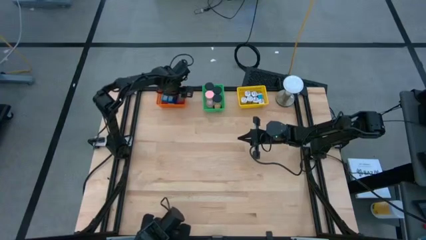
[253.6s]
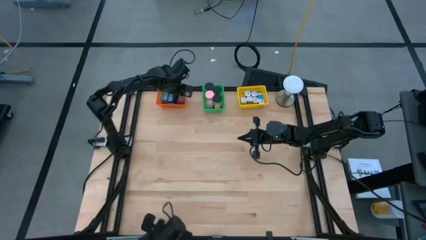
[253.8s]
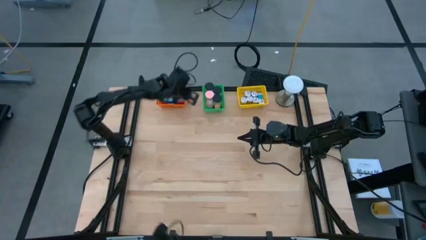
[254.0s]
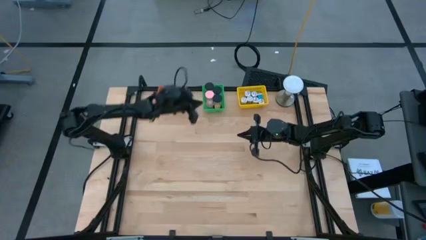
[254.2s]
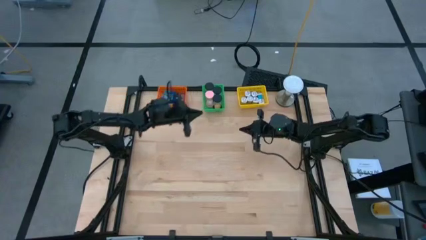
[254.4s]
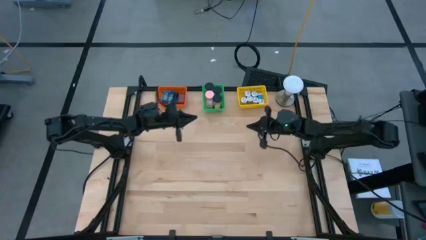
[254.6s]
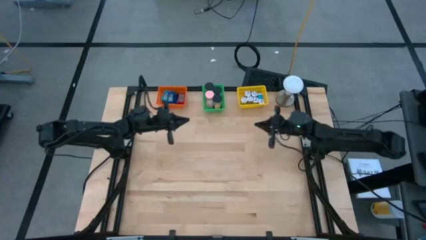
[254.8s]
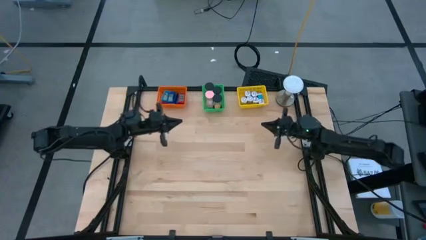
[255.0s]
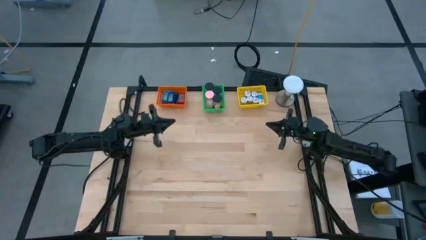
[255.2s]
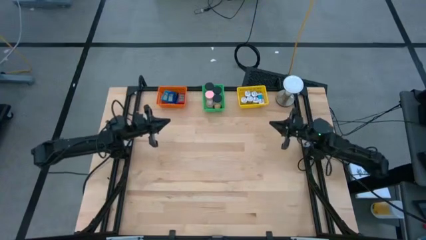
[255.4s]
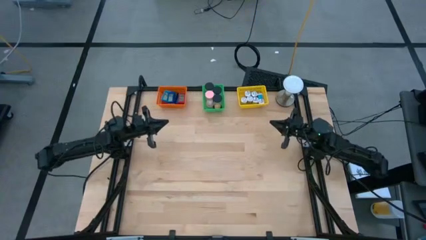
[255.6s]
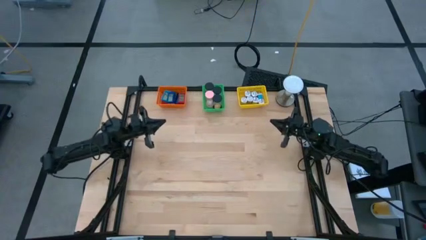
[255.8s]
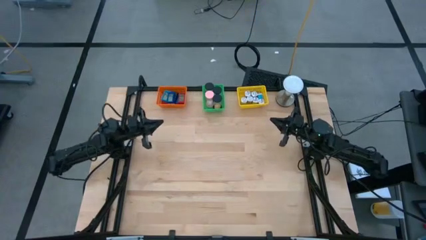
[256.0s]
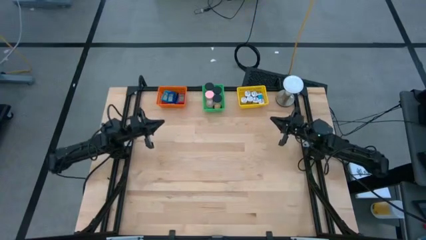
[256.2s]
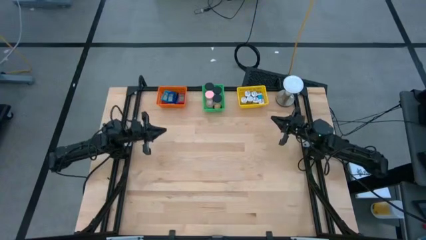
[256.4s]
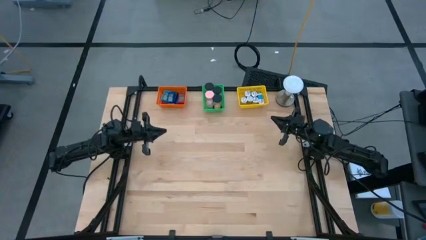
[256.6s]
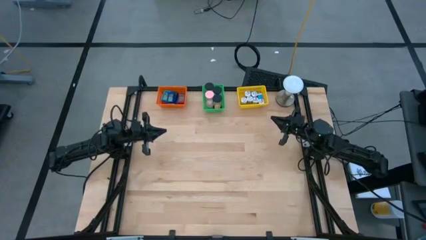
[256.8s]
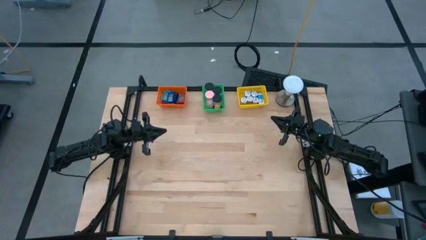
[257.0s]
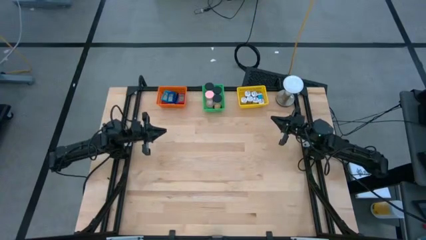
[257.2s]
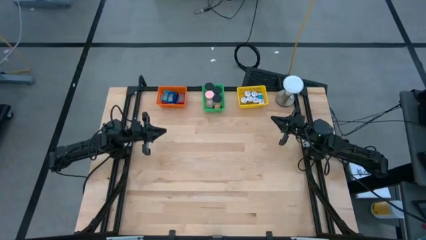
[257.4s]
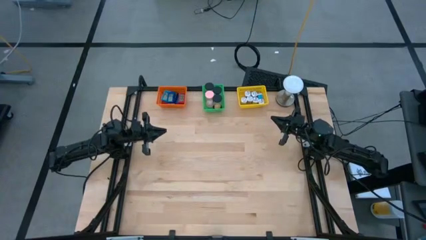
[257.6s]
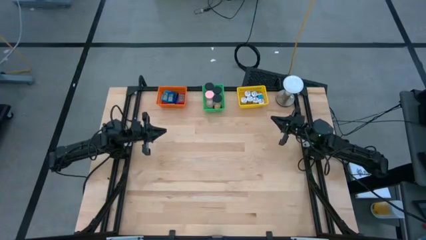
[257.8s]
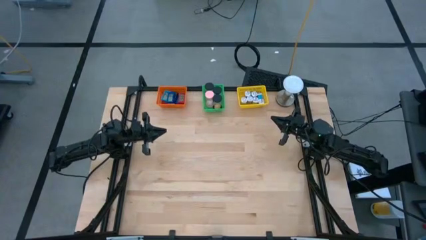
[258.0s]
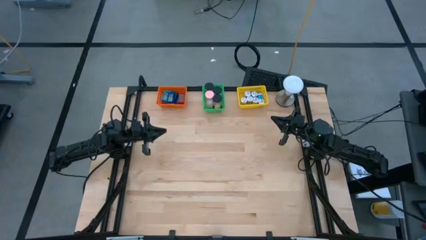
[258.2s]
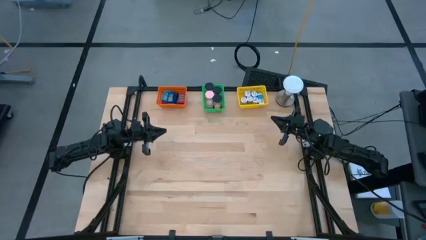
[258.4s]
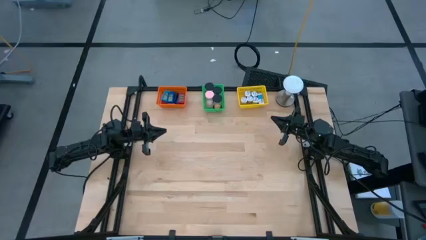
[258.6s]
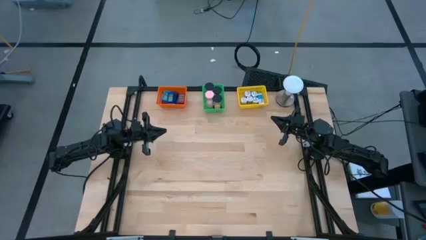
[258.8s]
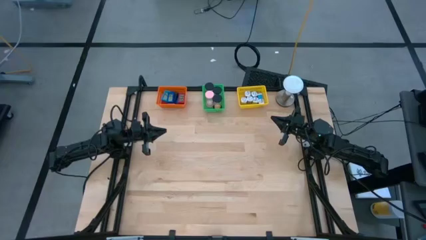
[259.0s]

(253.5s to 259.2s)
Task: Pick & Place Office items
Return to Home Position
